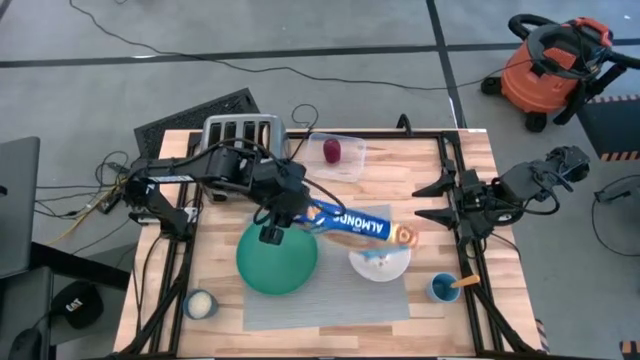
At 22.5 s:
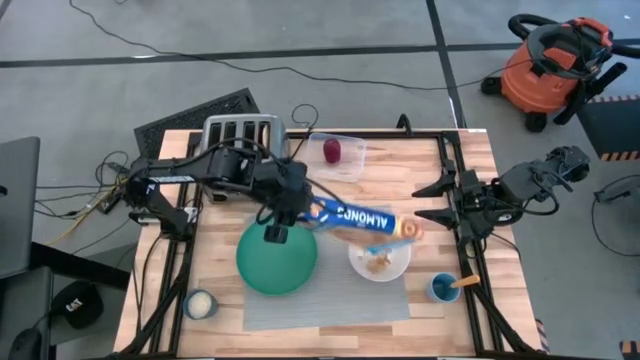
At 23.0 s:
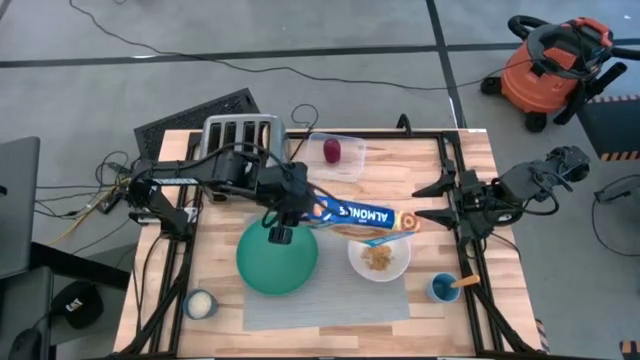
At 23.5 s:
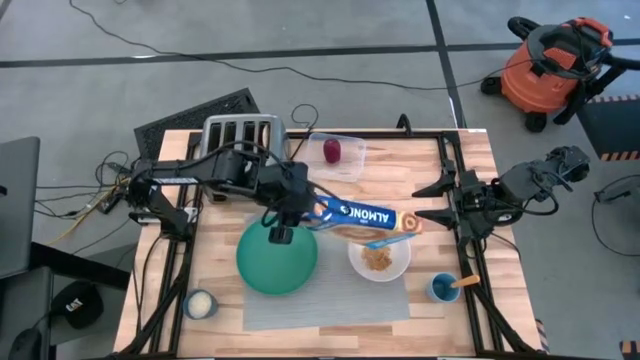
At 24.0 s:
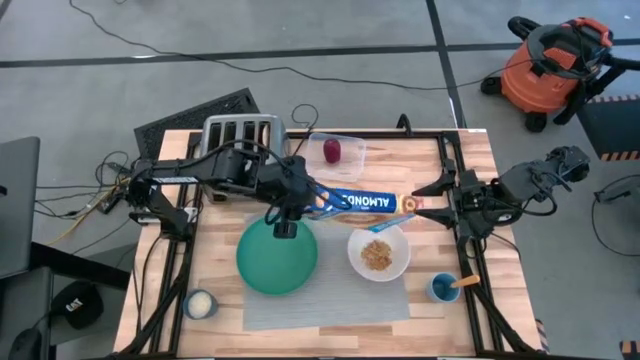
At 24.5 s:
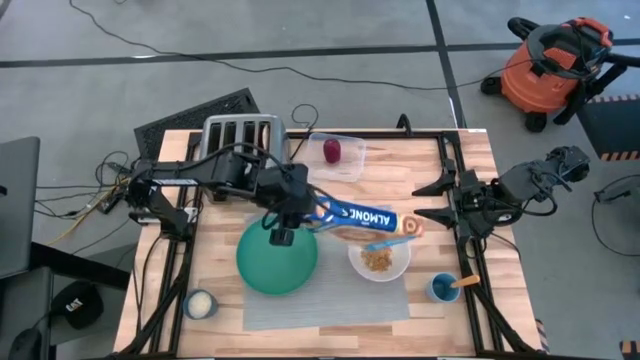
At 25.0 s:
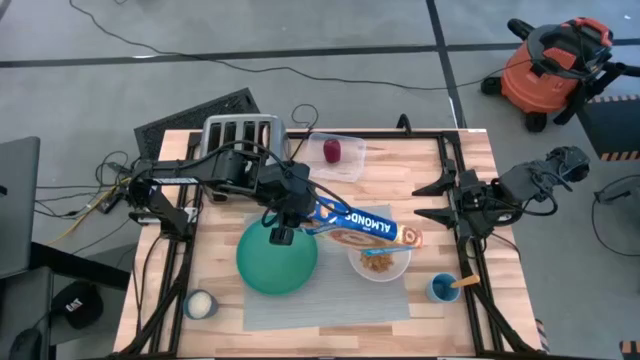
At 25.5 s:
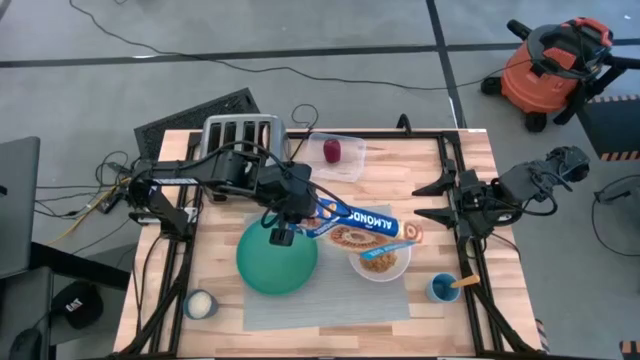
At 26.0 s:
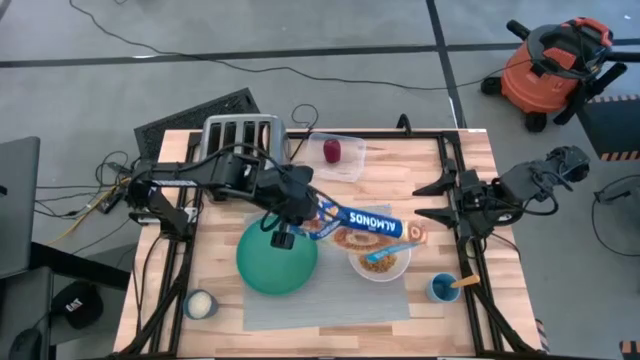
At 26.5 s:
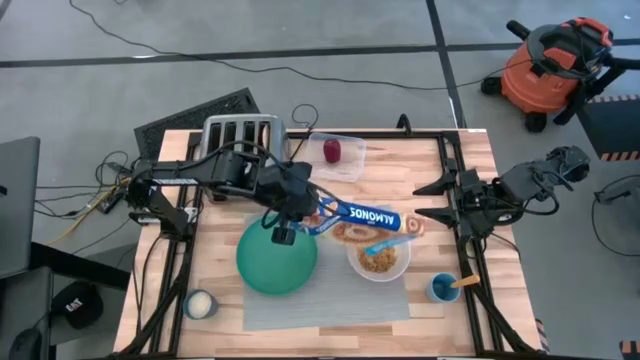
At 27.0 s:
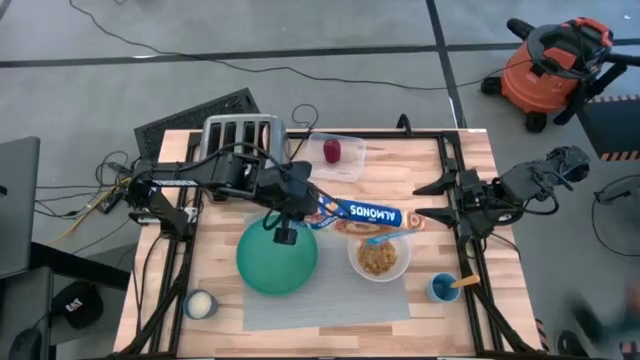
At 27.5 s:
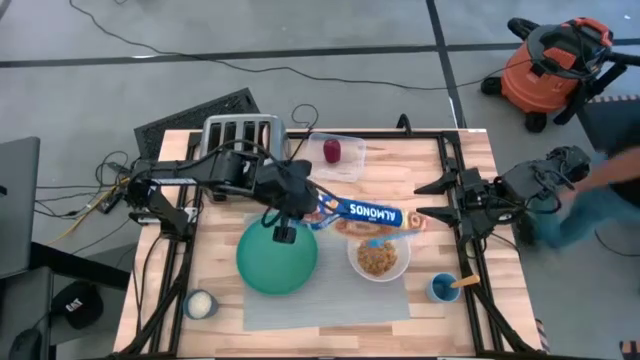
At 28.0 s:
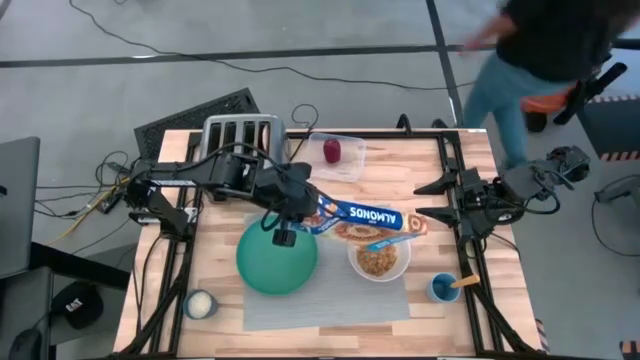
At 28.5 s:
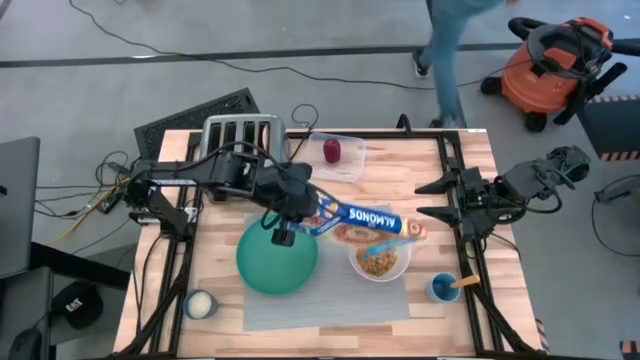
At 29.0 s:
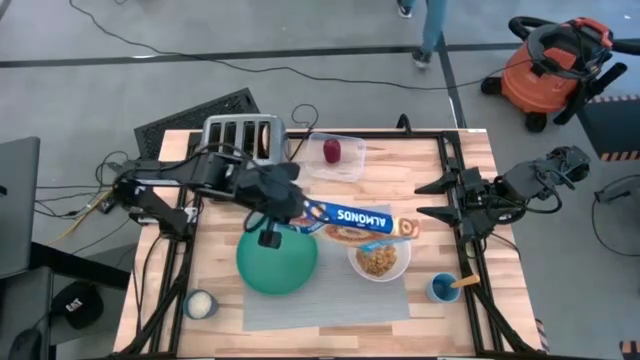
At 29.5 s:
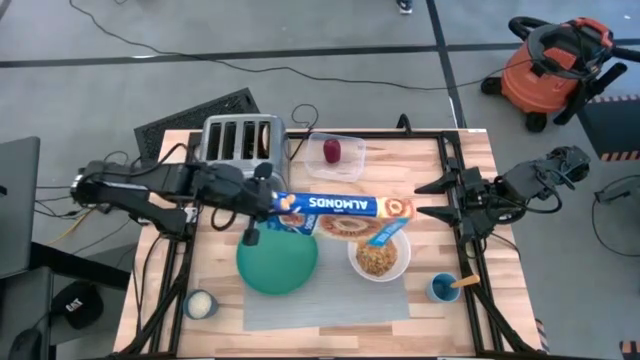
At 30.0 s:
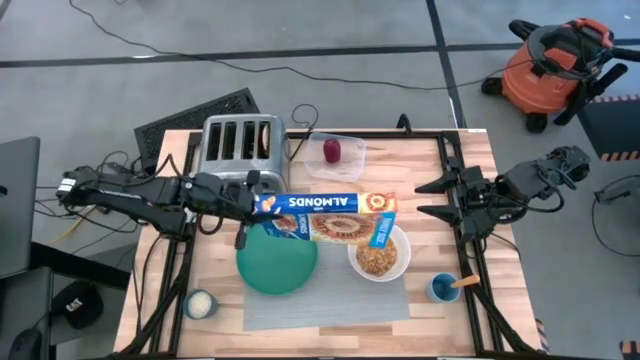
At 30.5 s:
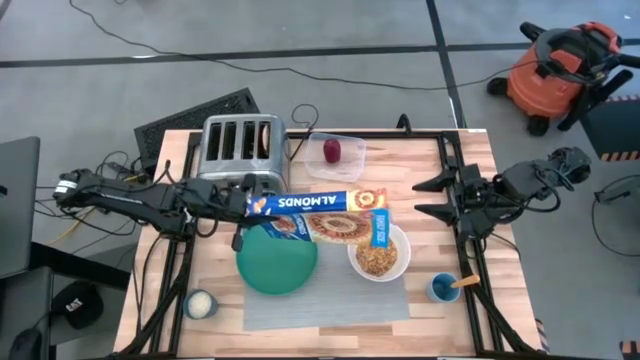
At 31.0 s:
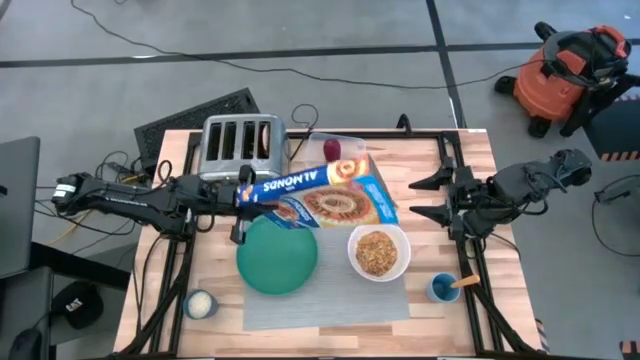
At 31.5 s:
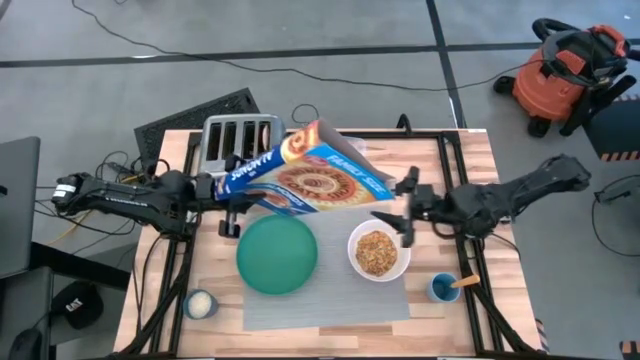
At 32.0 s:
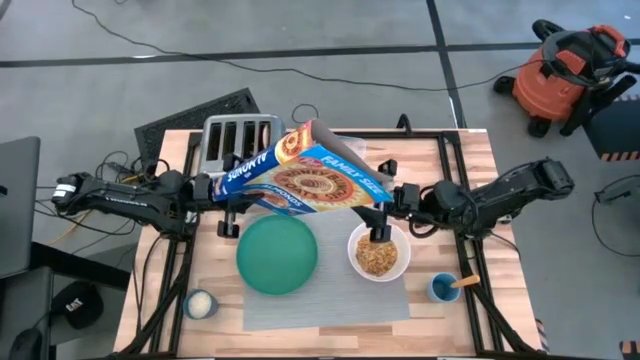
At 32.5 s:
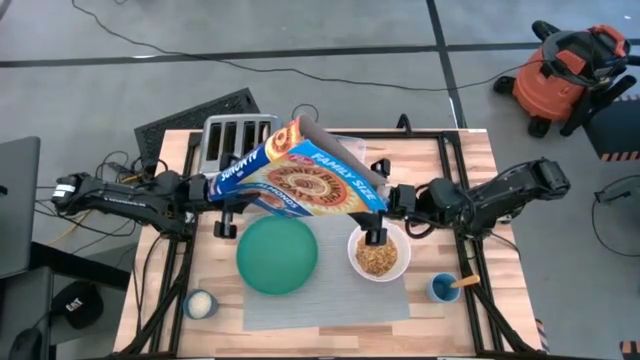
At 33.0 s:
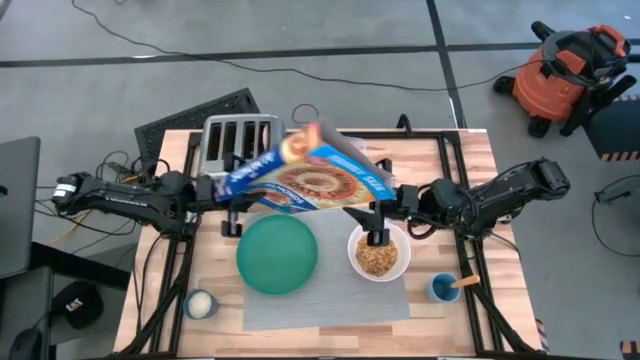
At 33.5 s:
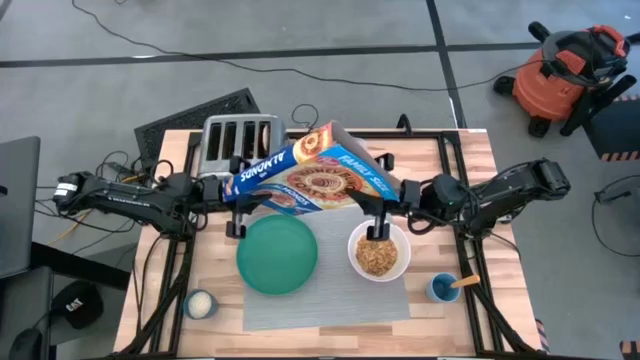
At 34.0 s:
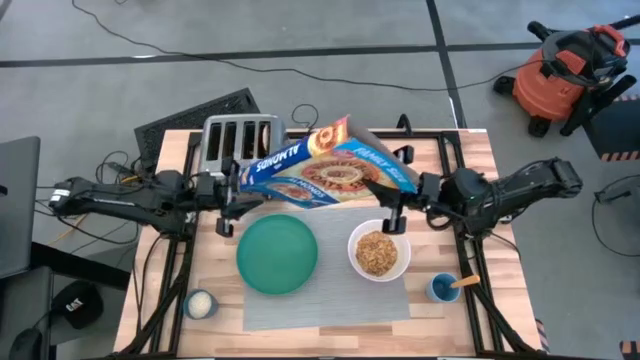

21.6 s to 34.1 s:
Task: Arrange a breakfast setting
Pour the cereal into the white bowl

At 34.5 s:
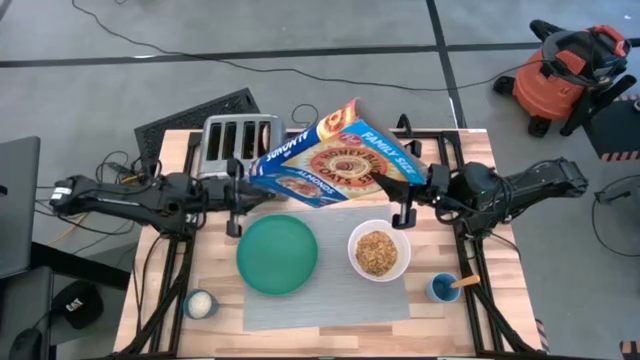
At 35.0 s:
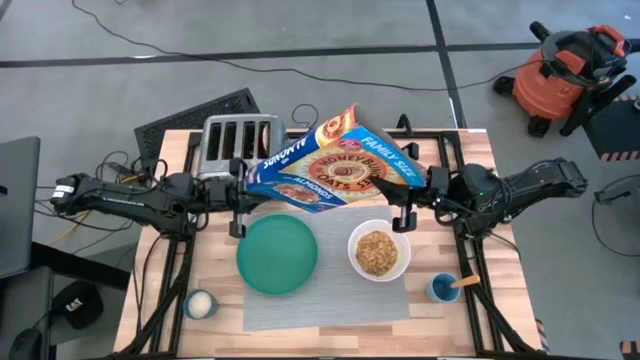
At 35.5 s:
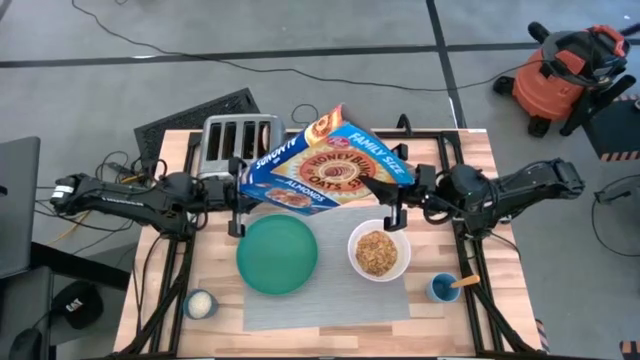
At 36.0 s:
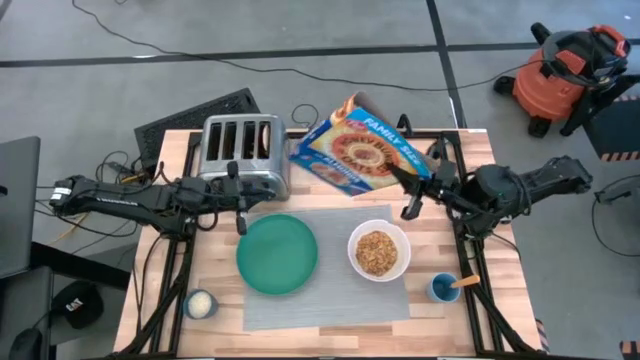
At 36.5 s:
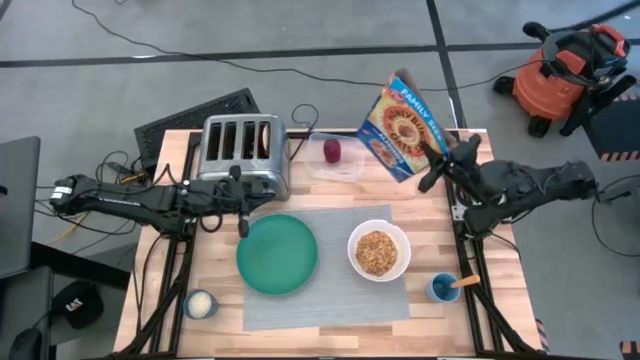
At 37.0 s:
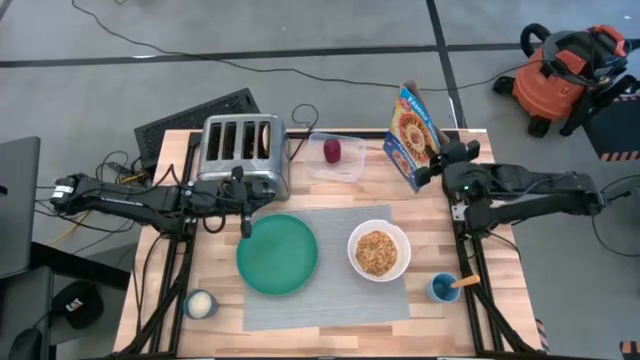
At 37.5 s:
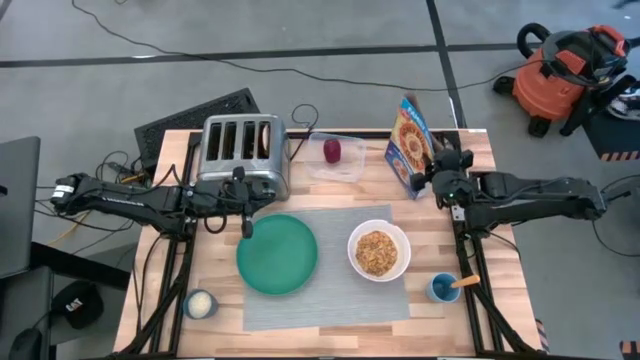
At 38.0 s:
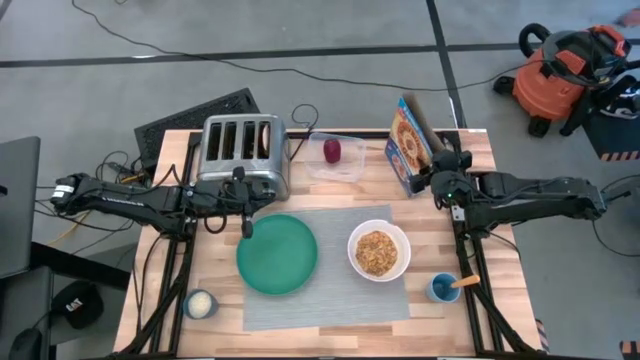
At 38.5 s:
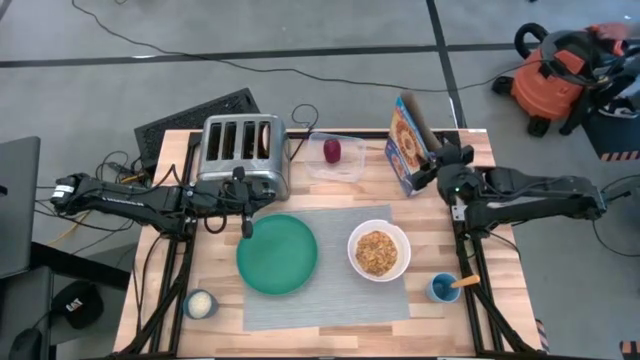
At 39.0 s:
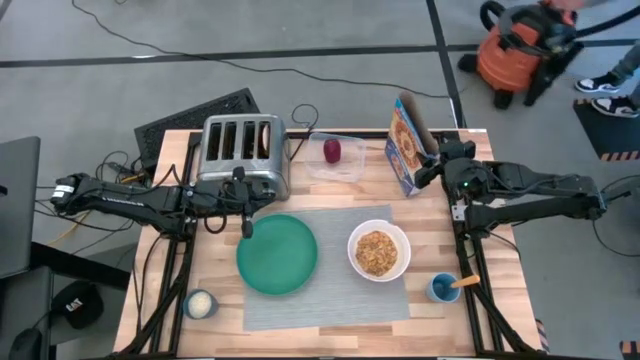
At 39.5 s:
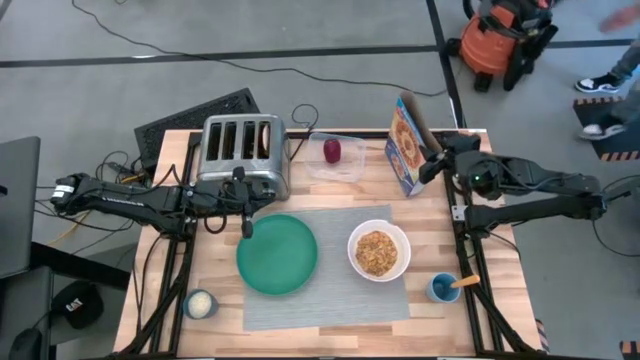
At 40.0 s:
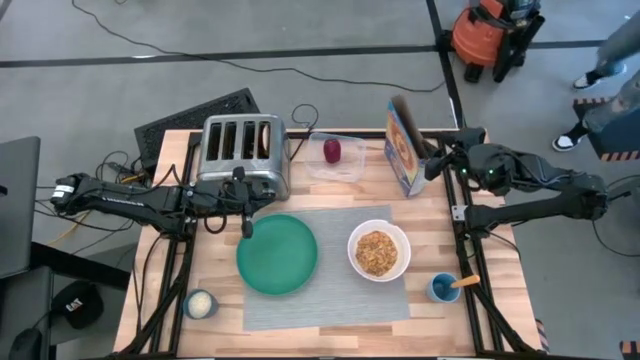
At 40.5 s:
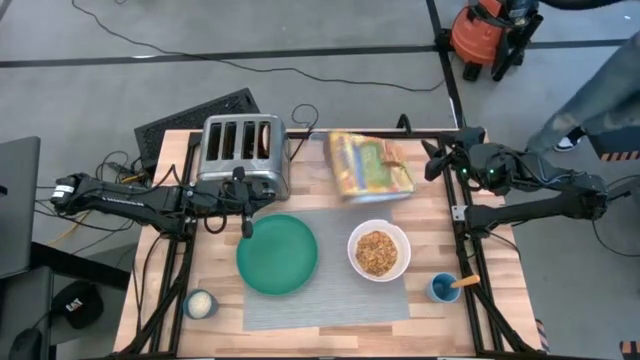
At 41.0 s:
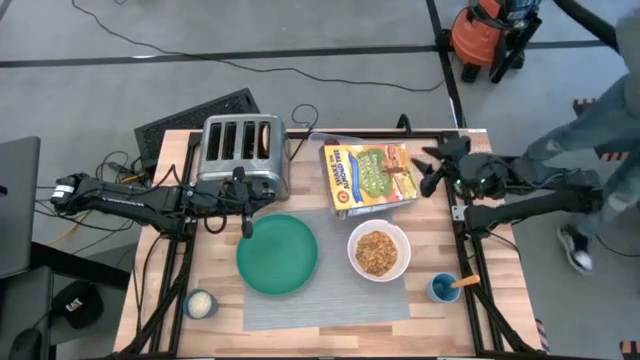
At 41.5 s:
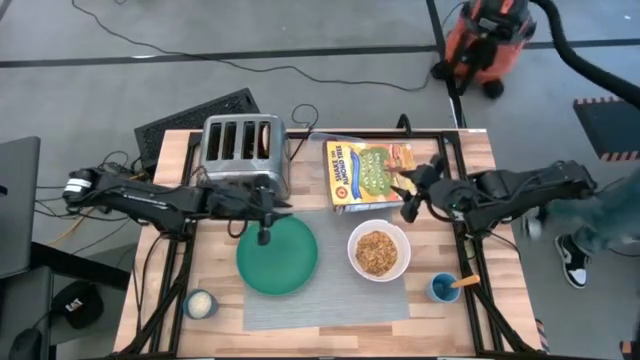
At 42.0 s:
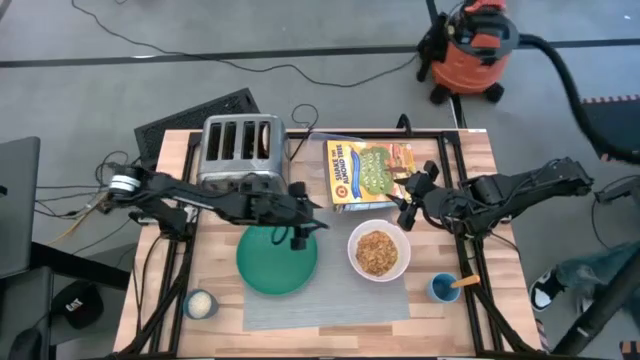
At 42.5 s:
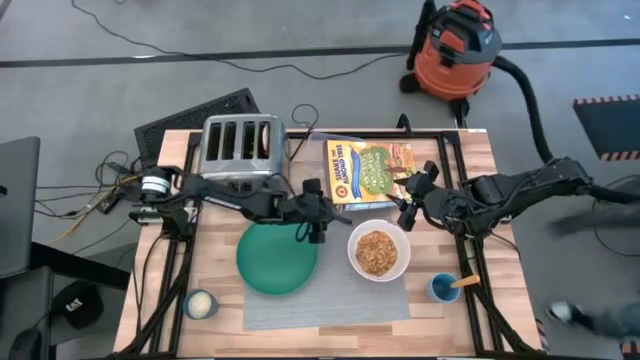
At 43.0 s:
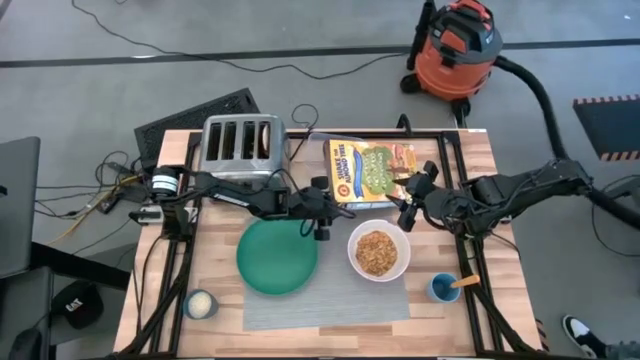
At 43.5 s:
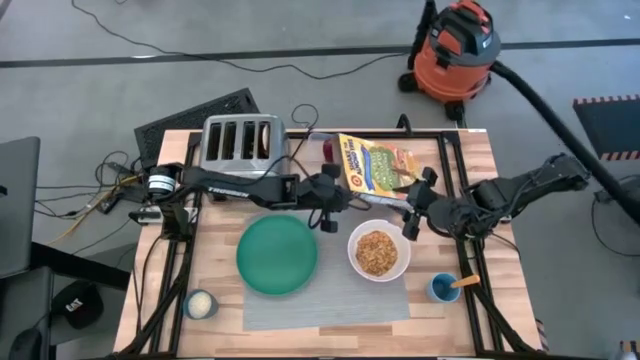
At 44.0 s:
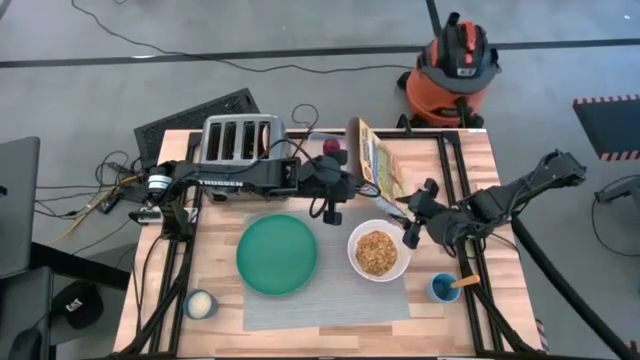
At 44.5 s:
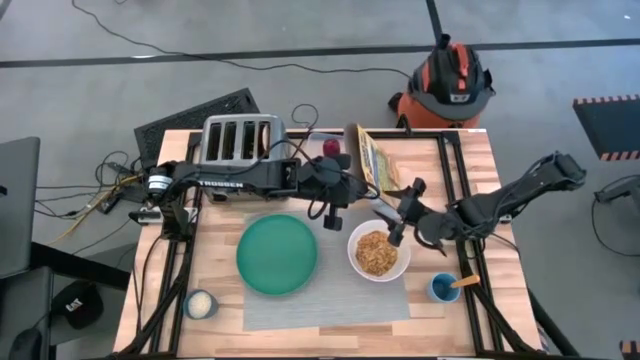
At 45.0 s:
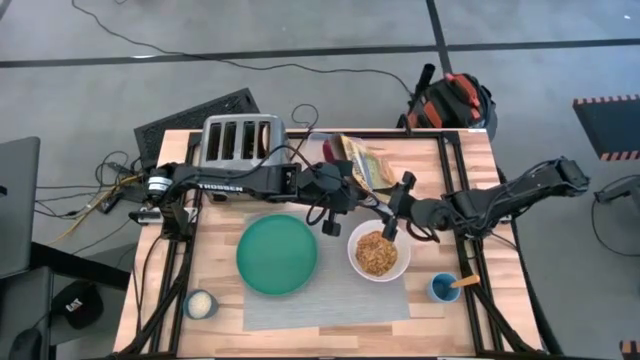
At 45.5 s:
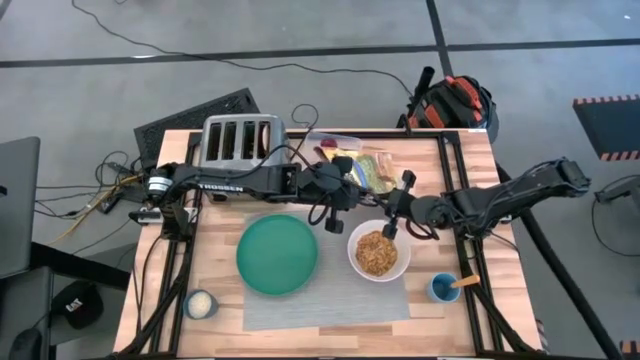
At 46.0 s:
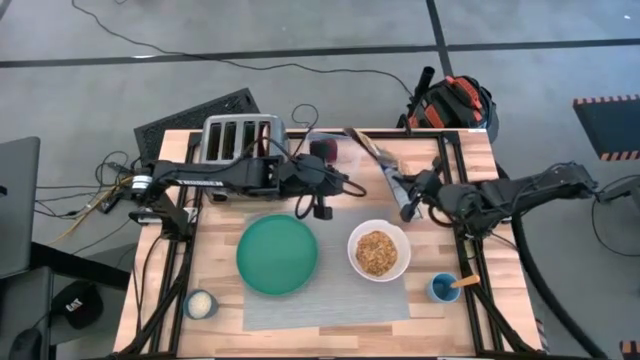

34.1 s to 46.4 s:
Put the cereal box on the top of the table
